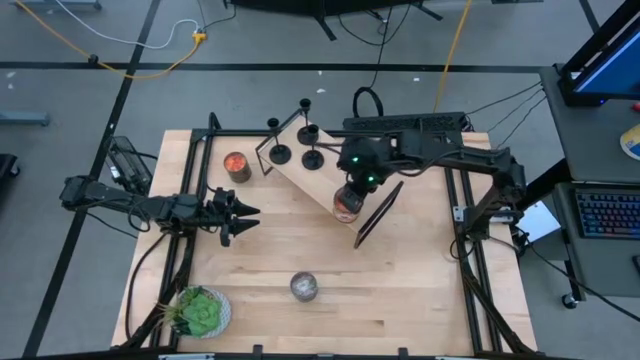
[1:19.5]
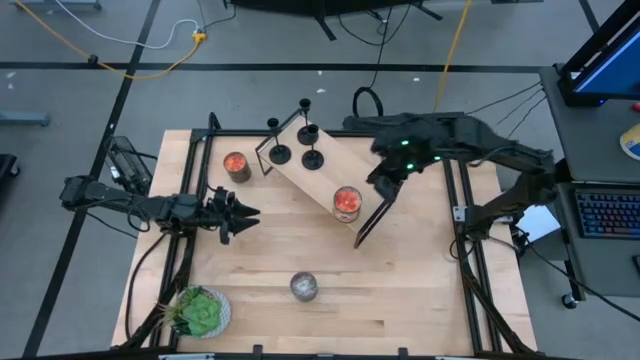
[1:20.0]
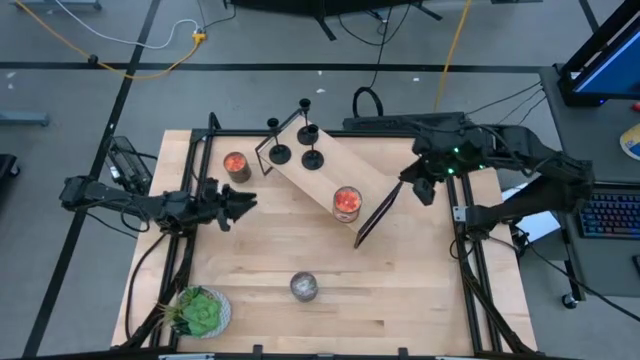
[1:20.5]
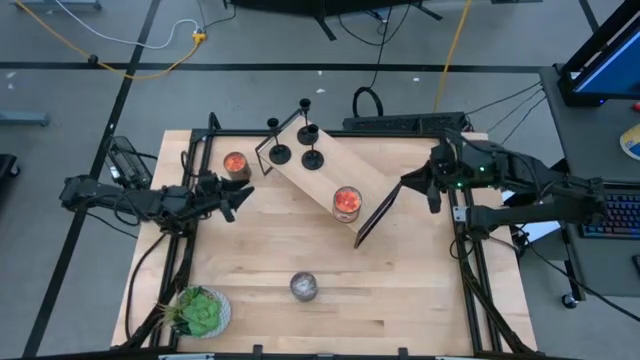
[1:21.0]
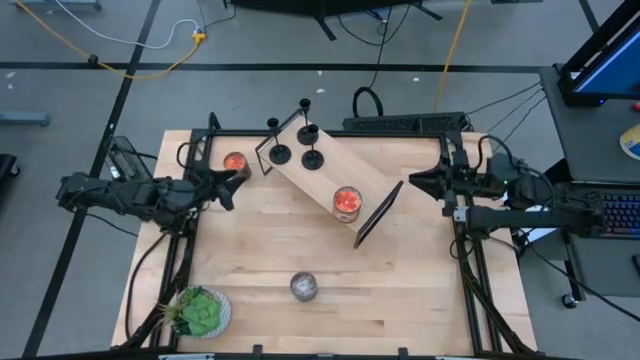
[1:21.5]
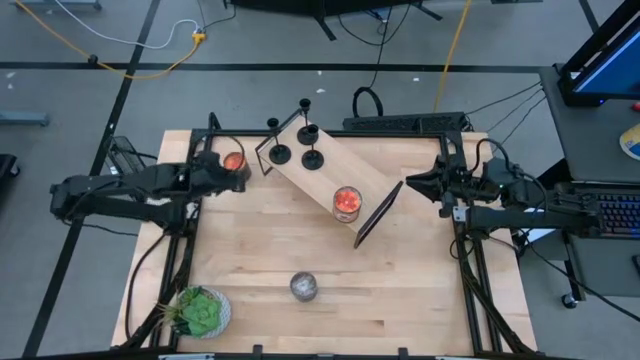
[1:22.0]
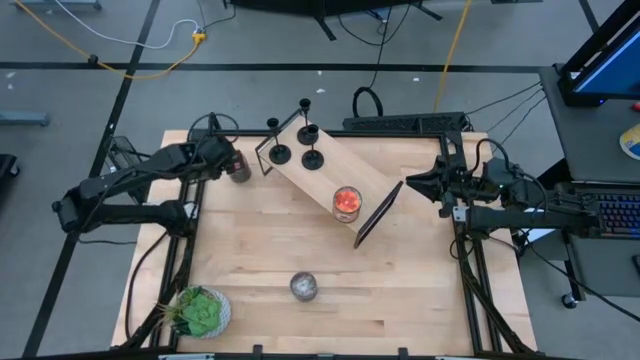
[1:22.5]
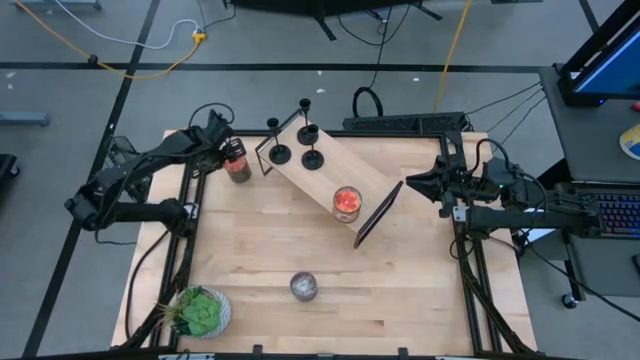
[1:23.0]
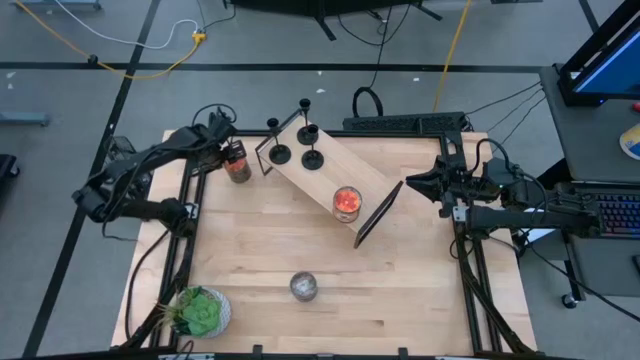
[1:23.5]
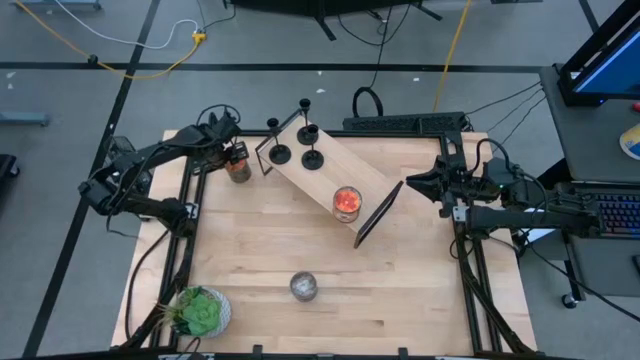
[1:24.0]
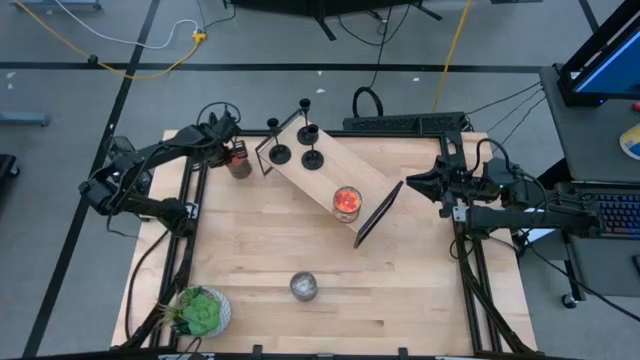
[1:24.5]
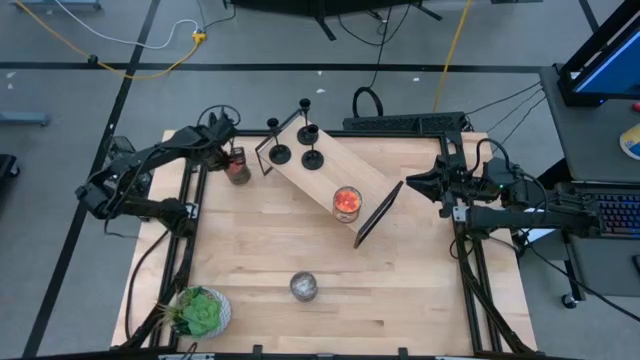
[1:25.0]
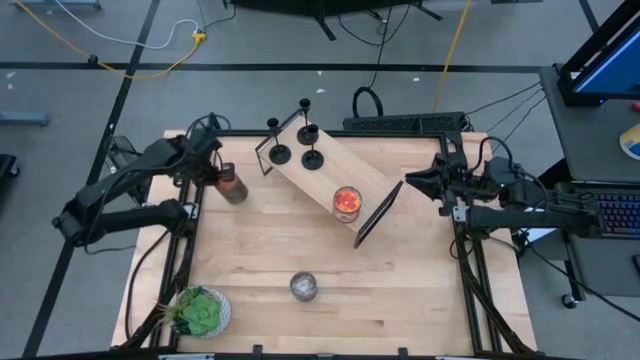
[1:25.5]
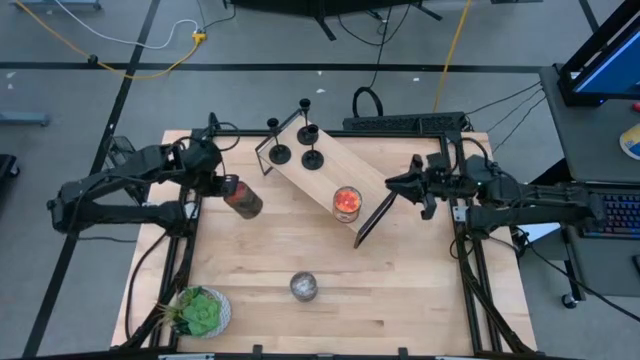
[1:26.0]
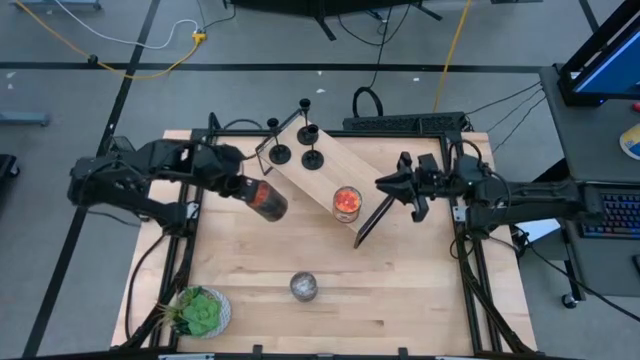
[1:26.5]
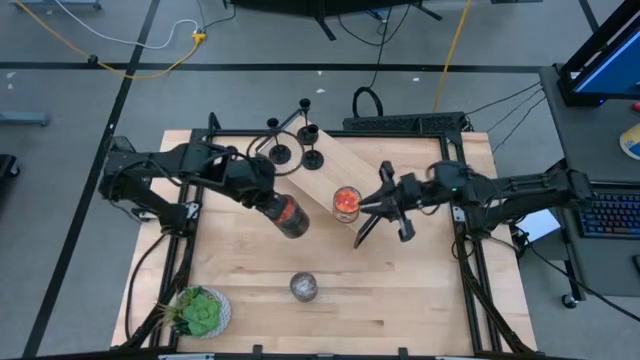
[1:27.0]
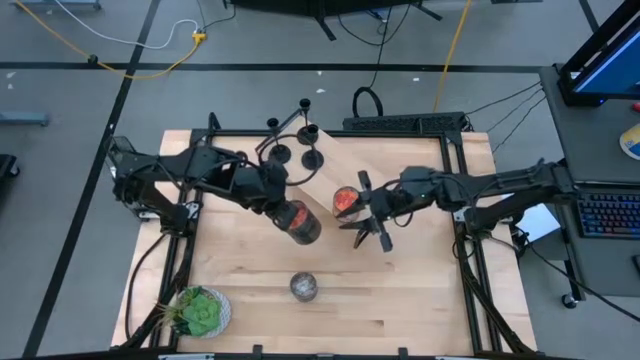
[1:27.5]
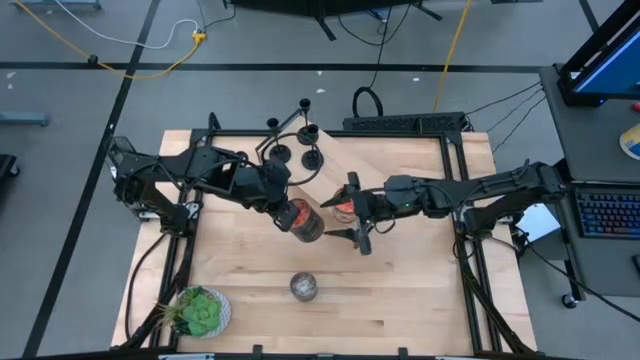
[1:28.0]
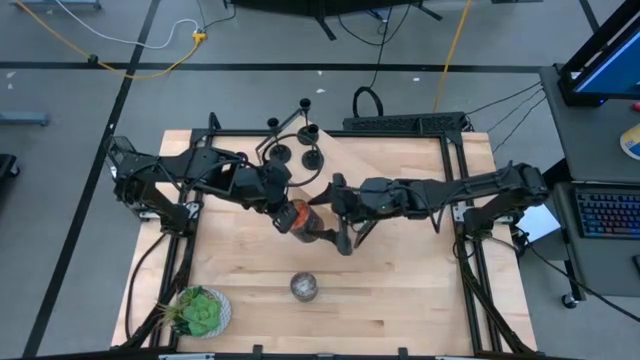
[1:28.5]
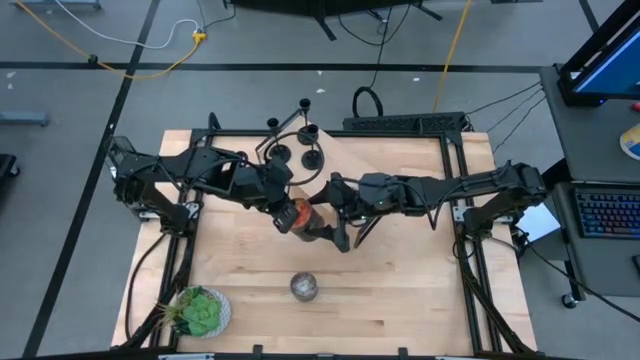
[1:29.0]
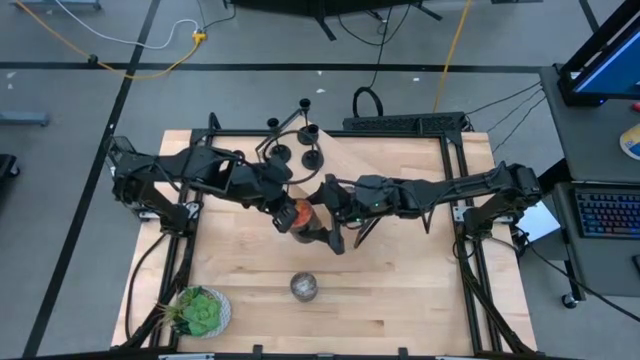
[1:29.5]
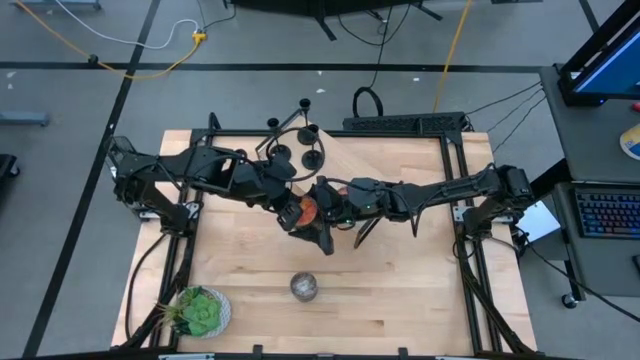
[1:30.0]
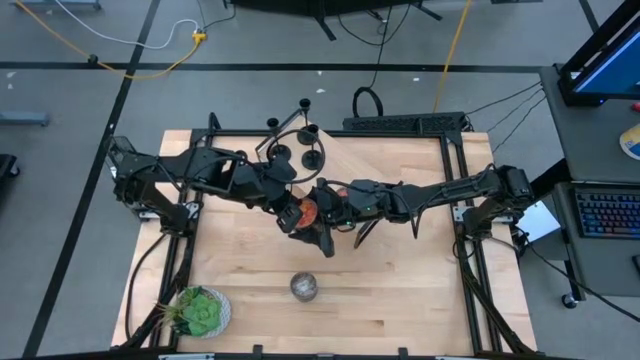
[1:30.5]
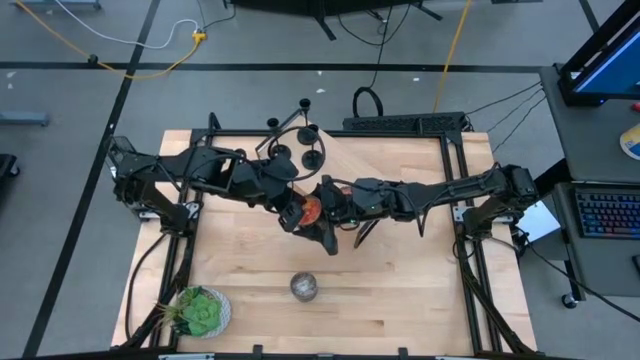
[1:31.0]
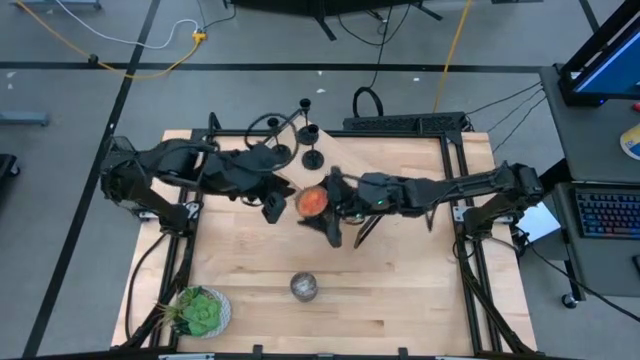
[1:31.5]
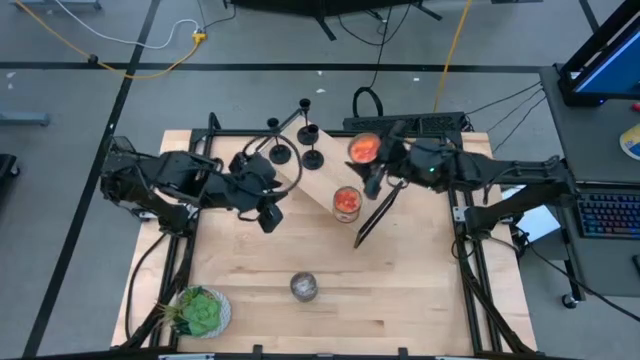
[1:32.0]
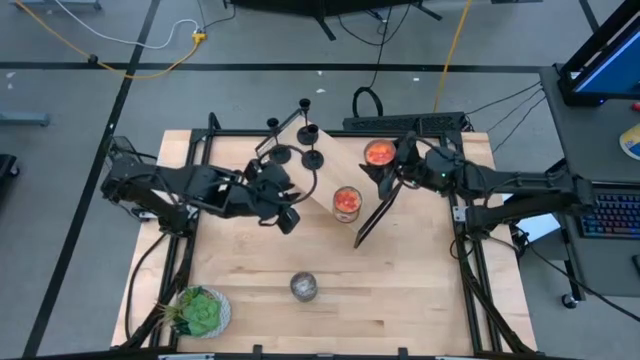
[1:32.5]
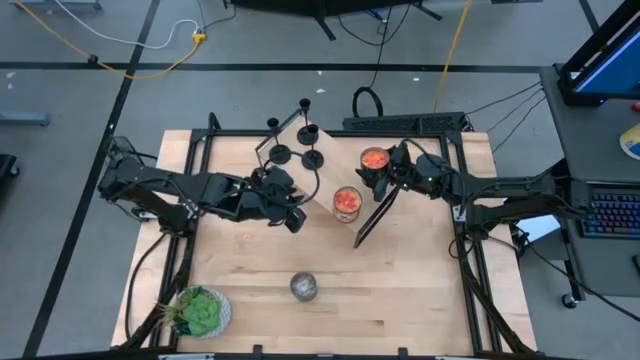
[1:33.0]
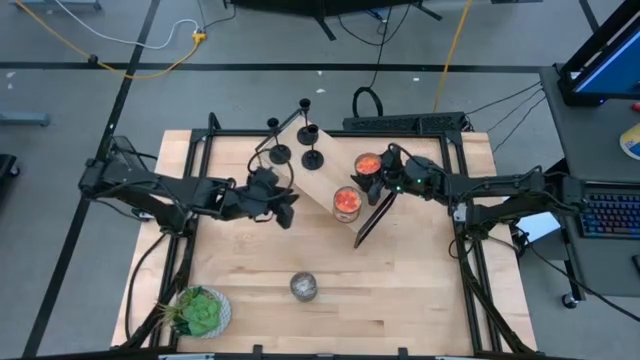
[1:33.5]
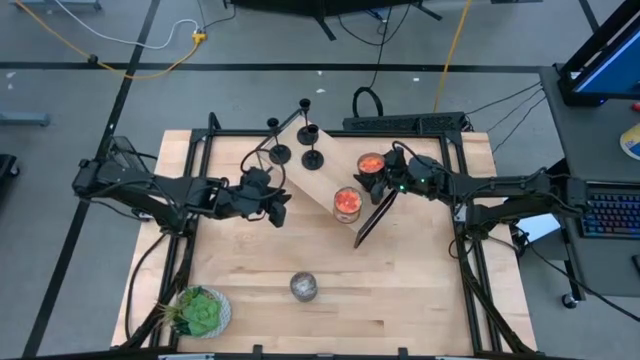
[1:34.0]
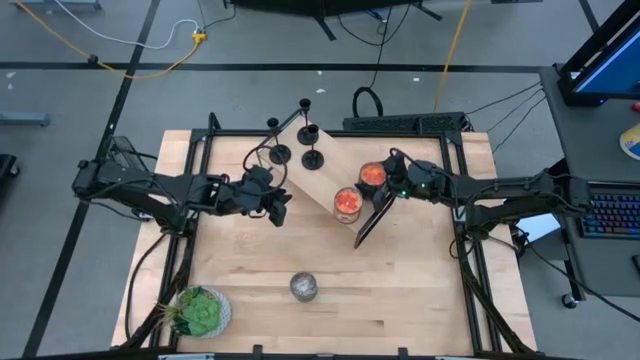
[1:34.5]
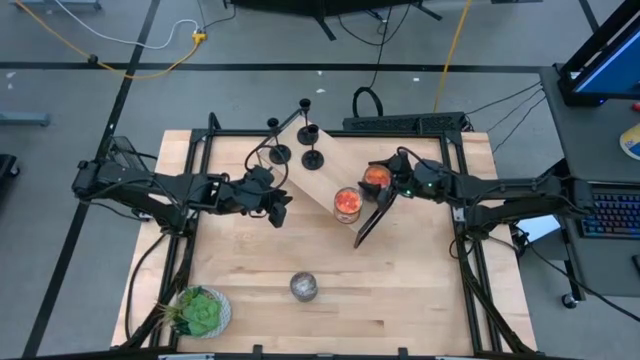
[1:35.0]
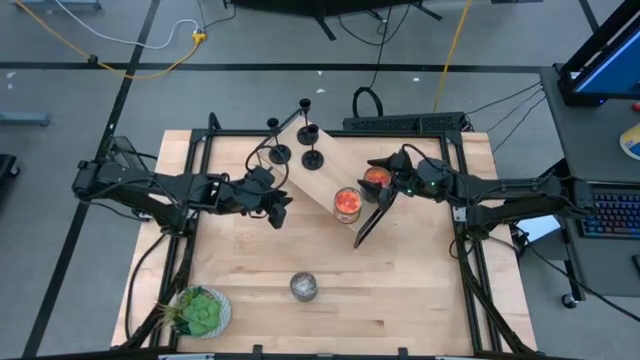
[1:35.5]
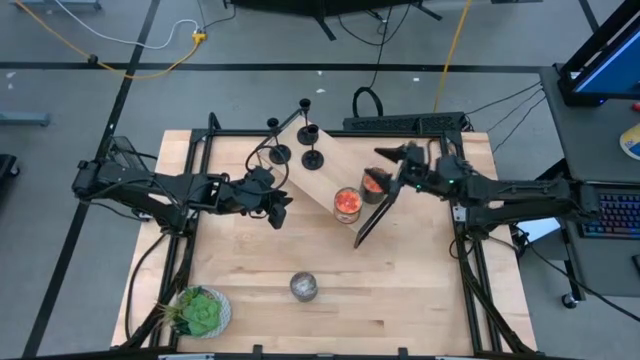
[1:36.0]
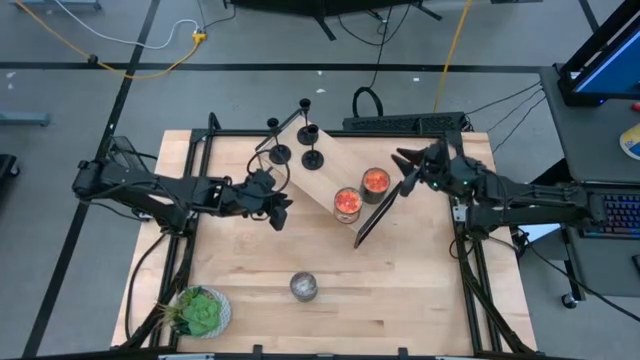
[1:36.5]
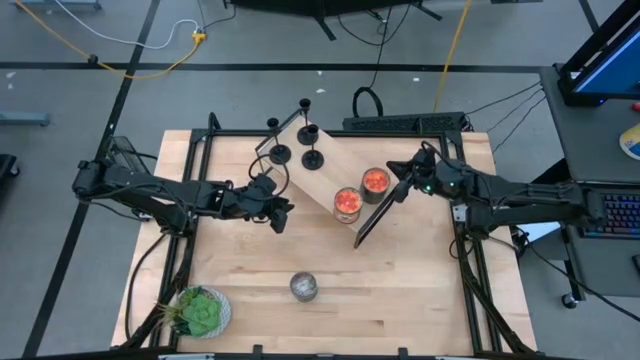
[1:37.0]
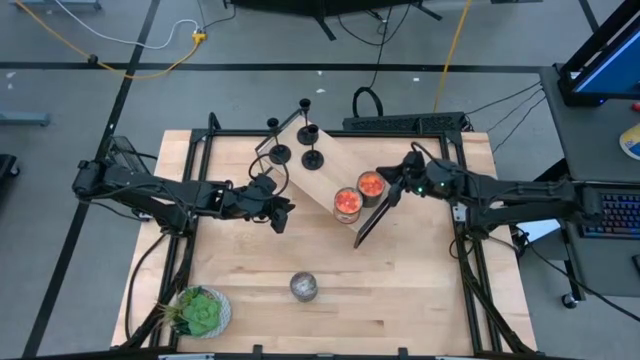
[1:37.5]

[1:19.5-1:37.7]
Task: Pick & Place candle stick holders
Align the orange scented candle with the other orange scented candle on the shelf

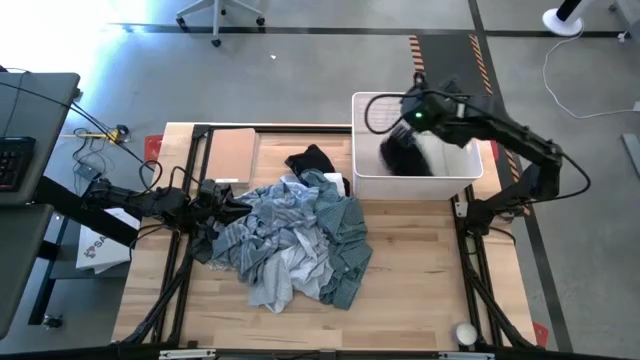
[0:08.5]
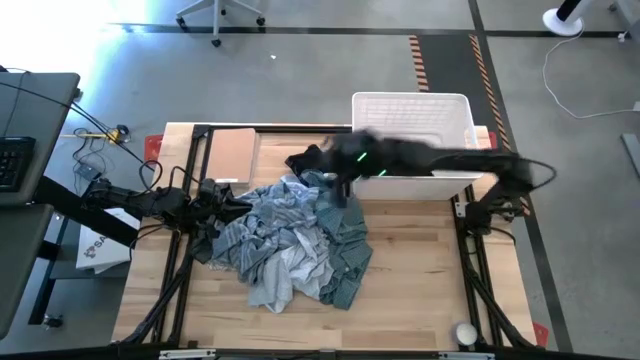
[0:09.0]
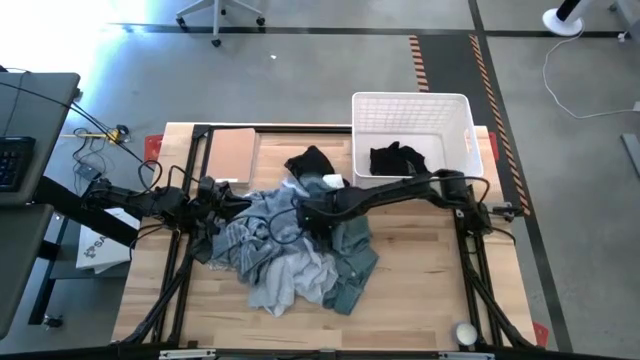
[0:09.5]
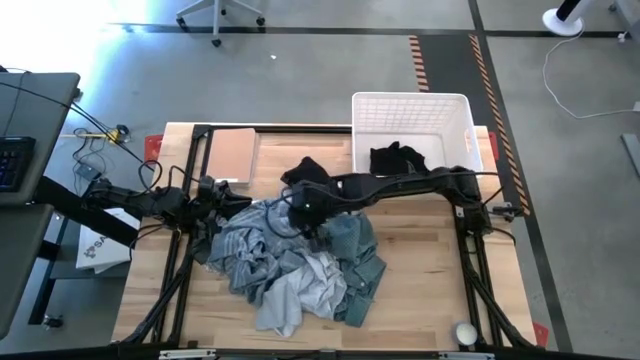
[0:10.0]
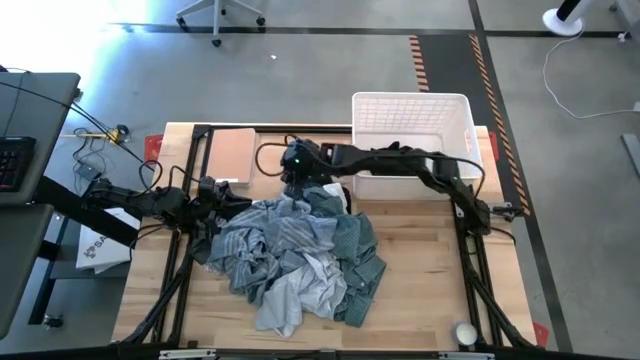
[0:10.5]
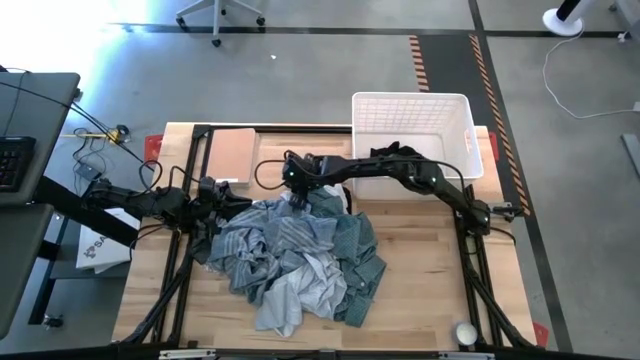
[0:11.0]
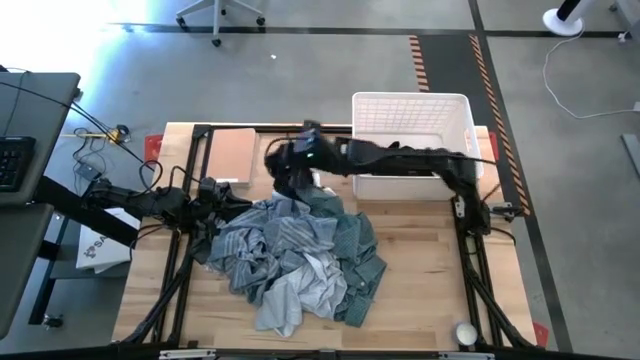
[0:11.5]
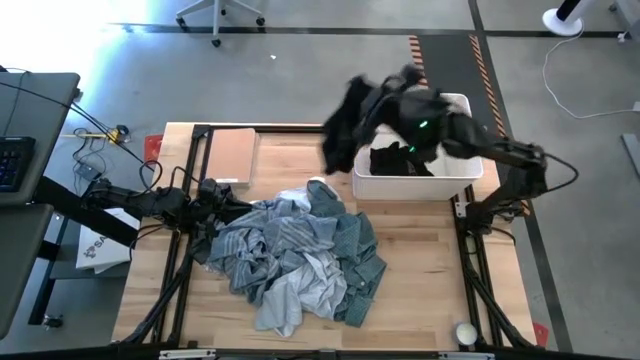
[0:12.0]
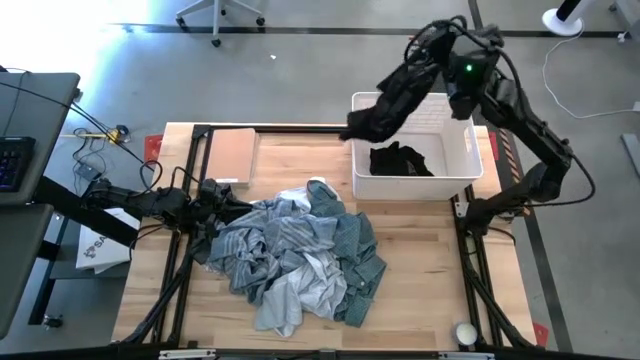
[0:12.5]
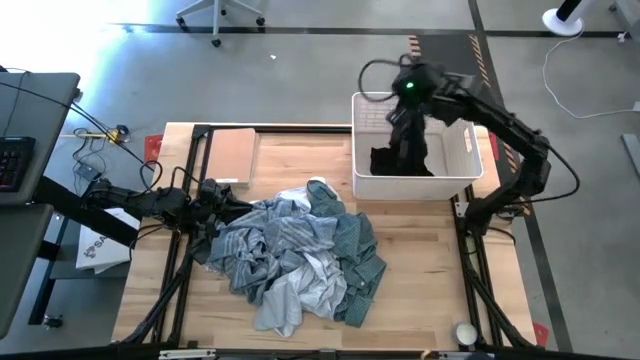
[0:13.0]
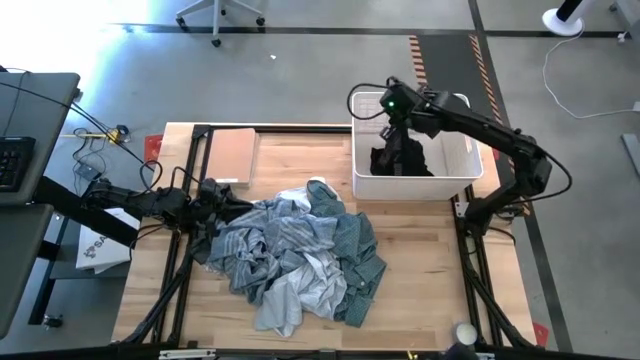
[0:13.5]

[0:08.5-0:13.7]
Task: Sort clothes
Put the black boxer into the white laundry bin
